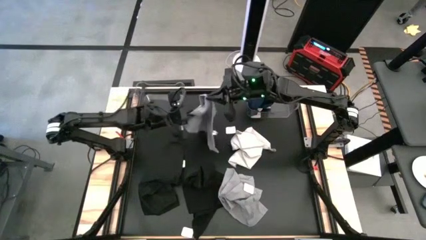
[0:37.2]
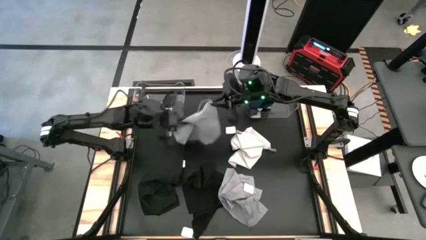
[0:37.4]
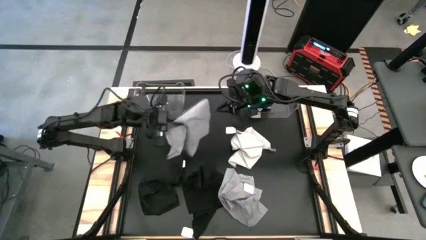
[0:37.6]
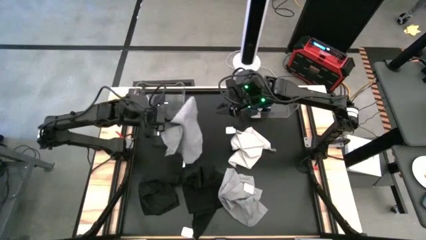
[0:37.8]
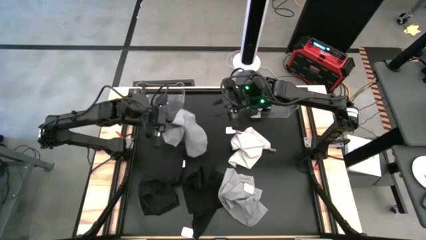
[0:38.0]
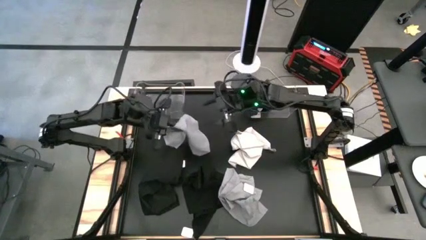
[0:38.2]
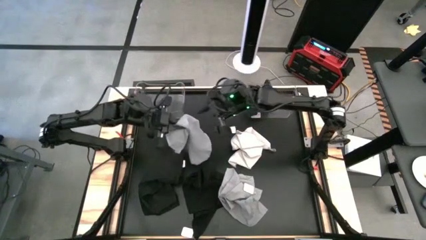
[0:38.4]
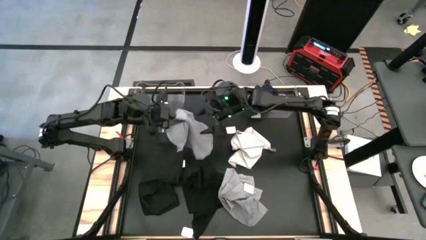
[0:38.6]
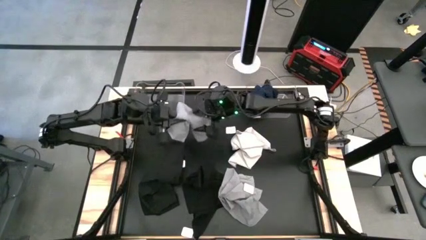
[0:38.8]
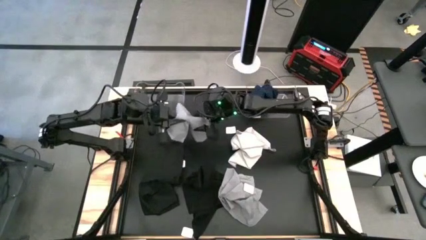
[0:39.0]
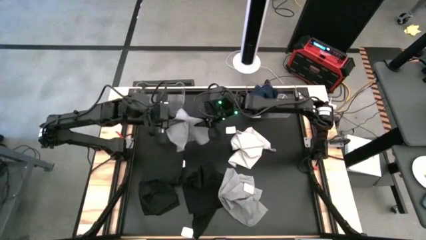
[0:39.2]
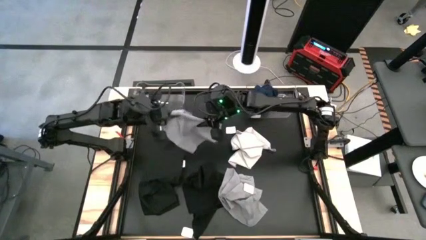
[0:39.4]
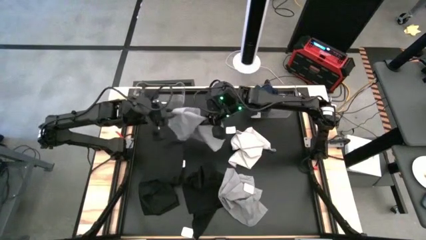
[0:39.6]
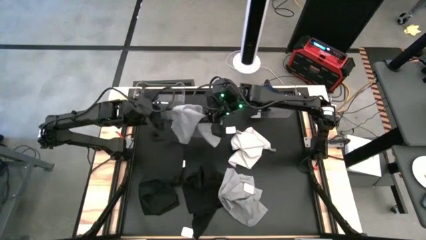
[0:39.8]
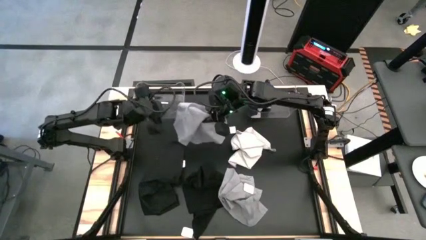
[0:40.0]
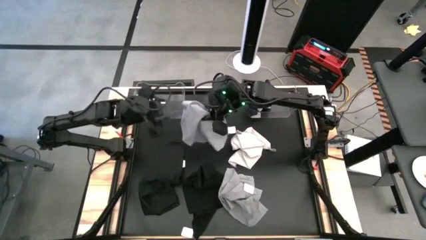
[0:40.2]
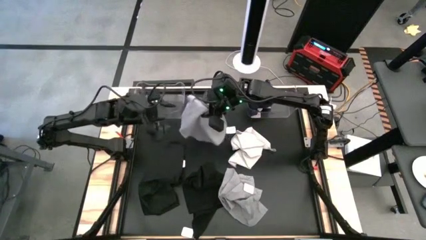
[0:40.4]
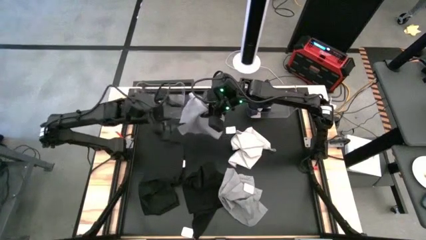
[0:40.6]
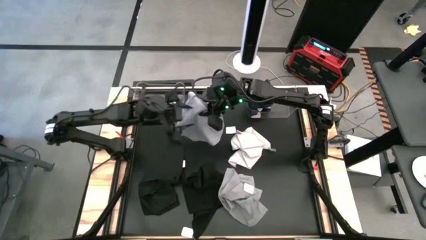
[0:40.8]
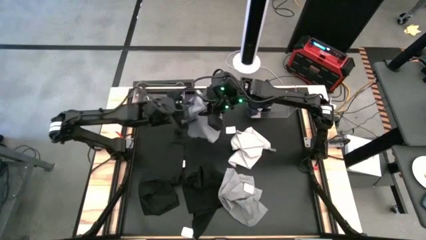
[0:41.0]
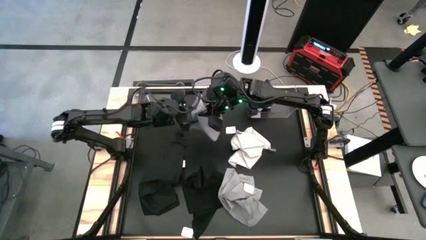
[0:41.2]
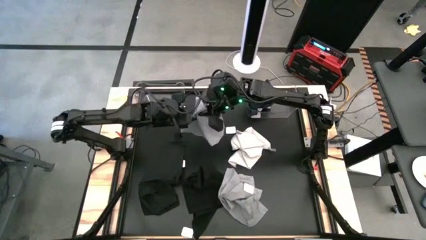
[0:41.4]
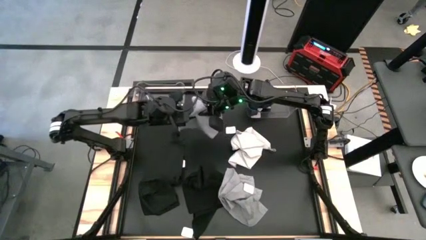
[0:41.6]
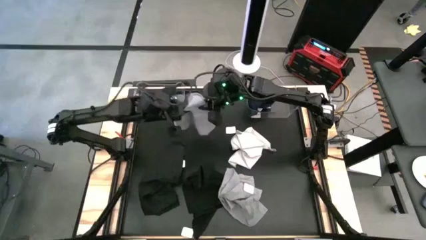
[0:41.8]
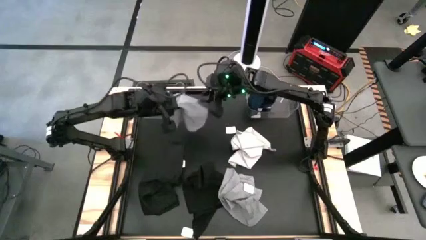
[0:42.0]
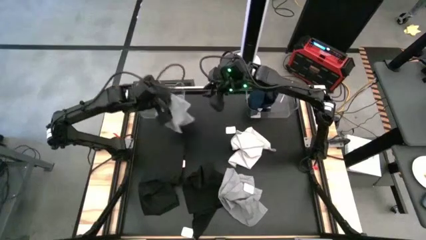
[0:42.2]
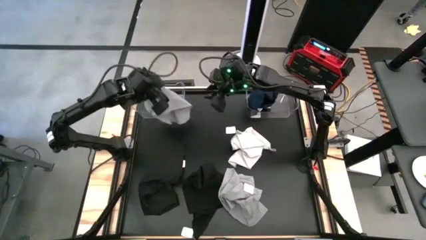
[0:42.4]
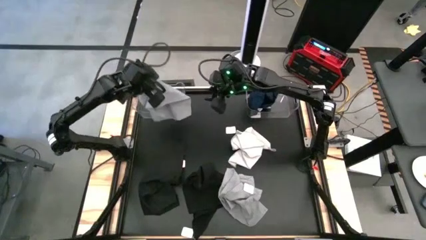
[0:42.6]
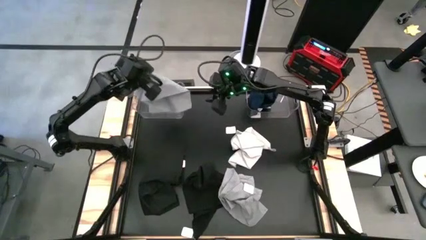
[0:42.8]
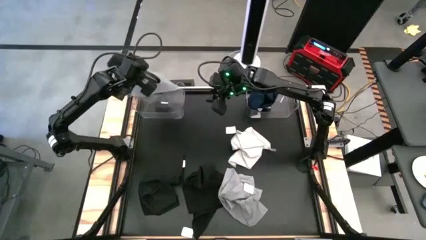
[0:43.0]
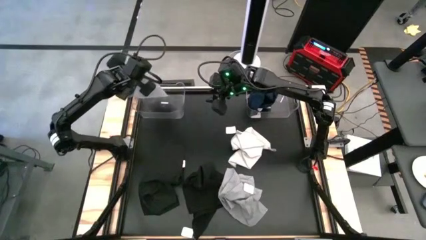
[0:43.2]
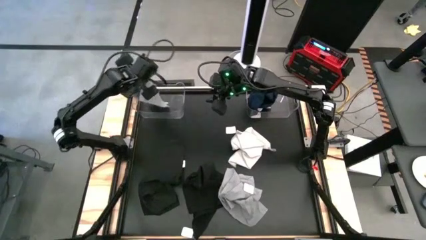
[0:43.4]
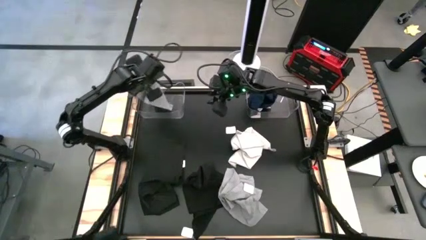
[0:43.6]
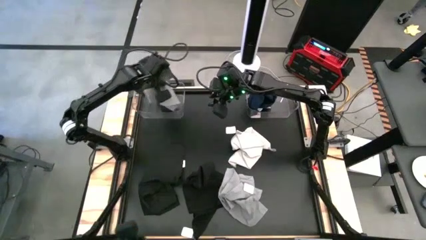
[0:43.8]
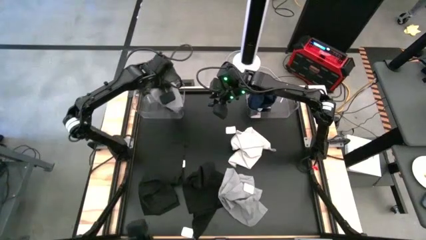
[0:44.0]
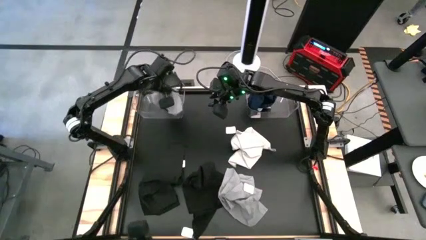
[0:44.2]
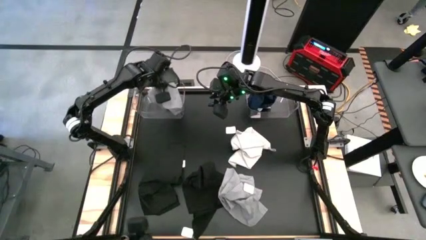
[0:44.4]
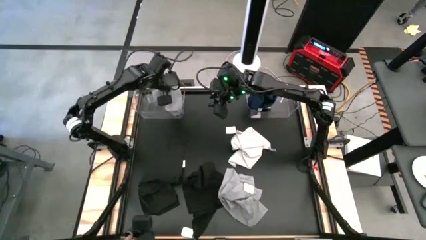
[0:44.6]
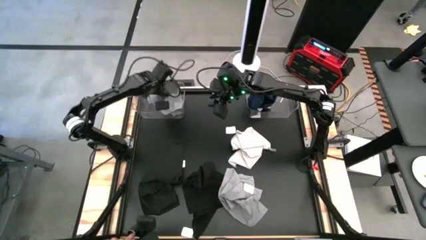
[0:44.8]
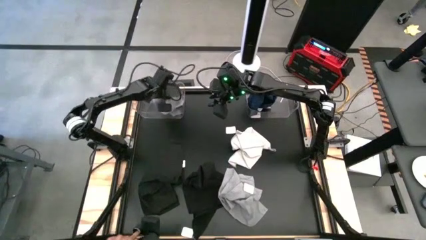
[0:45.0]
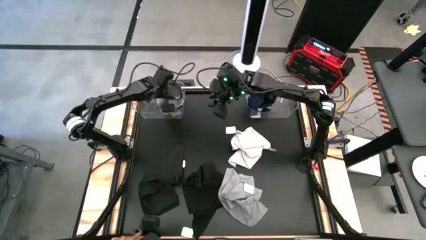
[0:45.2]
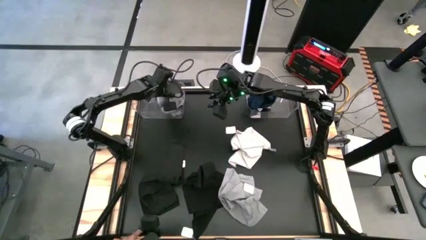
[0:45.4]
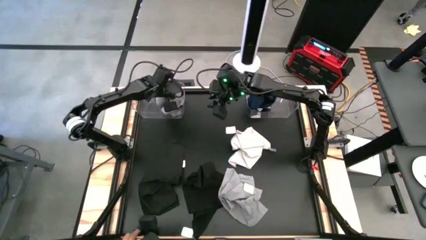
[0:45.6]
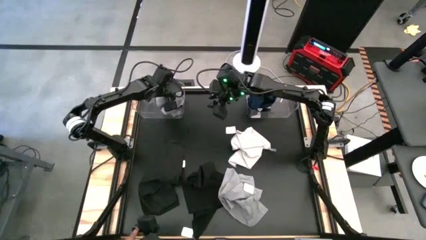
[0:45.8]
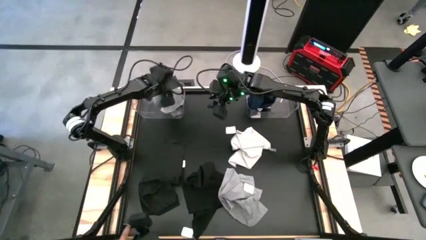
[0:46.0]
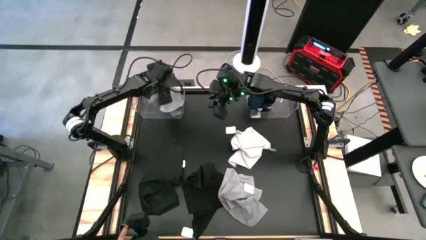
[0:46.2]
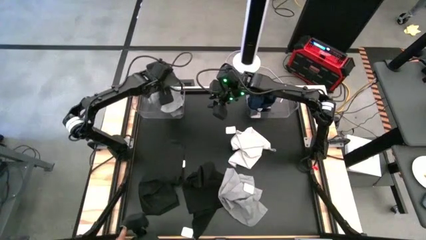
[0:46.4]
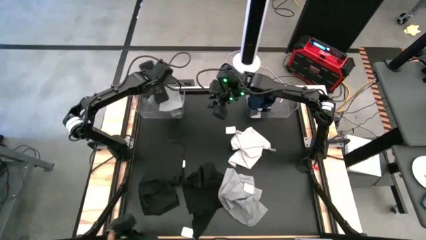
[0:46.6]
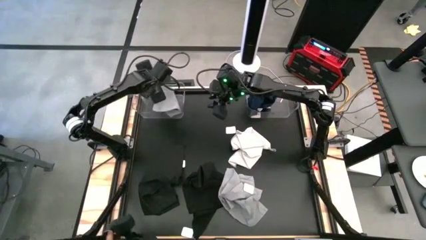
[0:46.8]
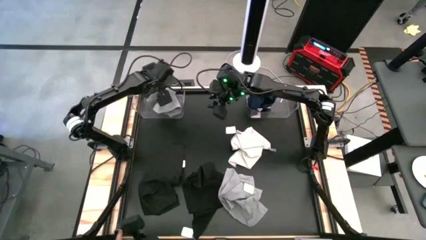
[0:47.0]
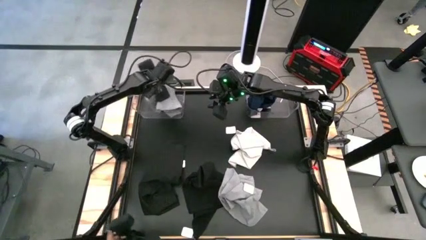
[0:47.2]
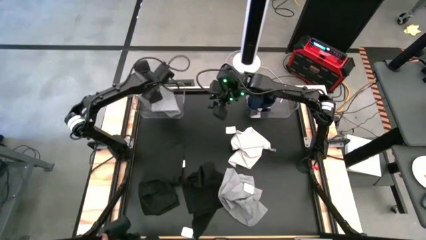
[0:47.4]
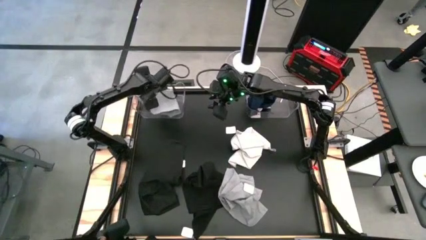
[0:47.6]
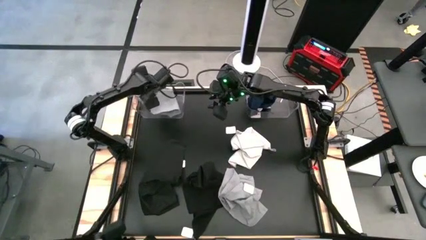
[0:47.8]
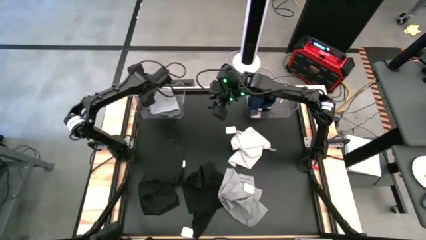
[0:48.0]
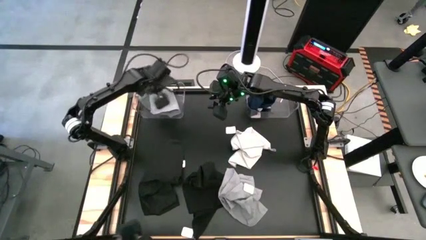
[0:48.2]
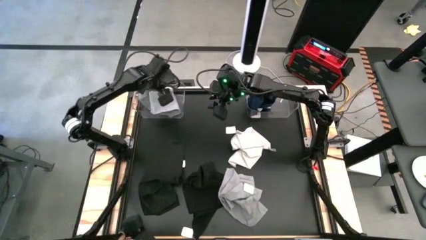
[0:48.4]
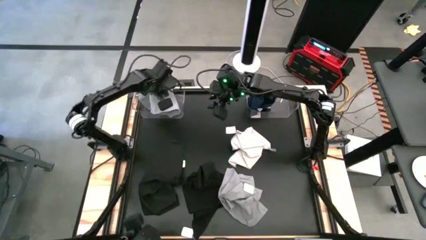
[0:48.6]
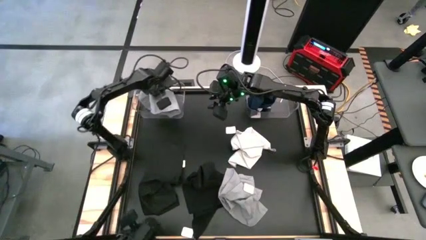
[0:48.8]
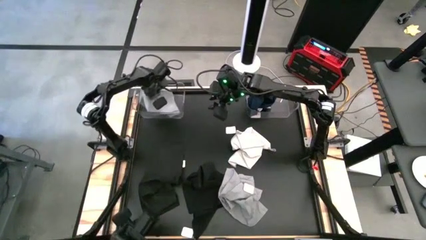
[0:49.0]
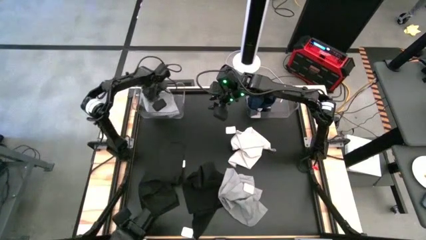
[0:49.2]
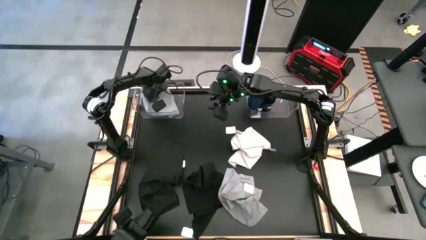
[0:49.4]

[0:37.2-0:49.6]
Task: Sort towels by color in basket
Put the top gray towel into the left transparent bin
